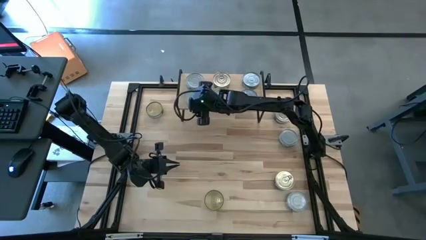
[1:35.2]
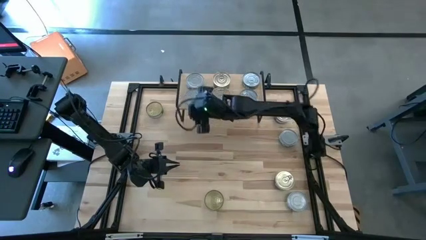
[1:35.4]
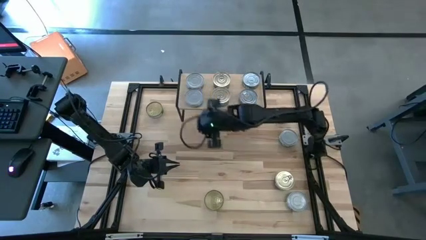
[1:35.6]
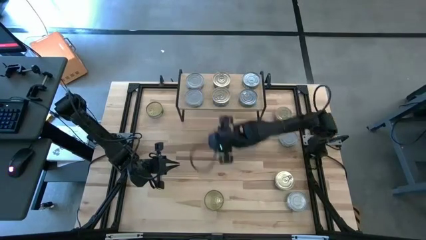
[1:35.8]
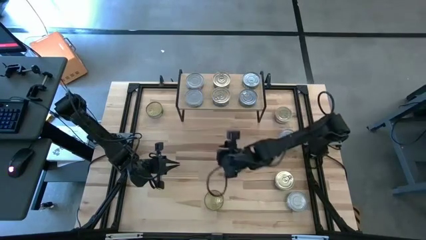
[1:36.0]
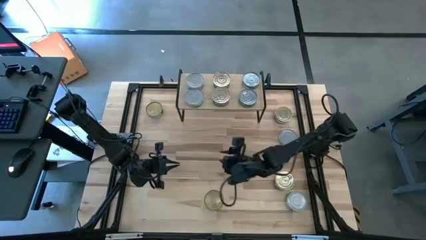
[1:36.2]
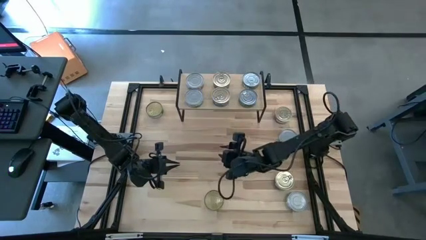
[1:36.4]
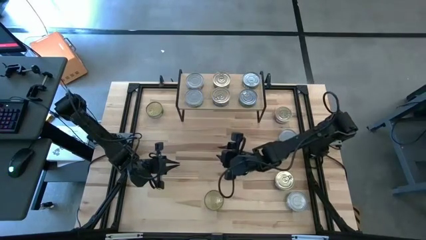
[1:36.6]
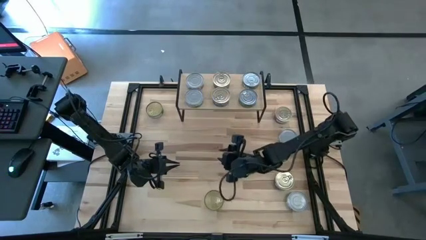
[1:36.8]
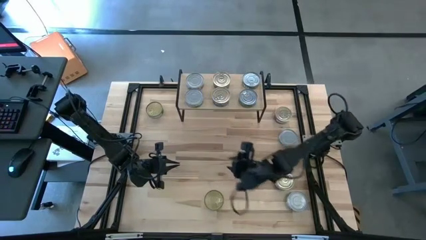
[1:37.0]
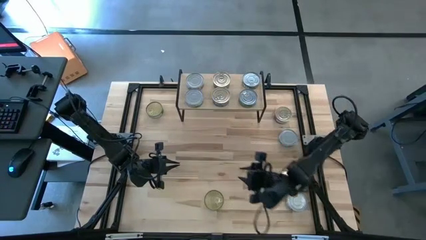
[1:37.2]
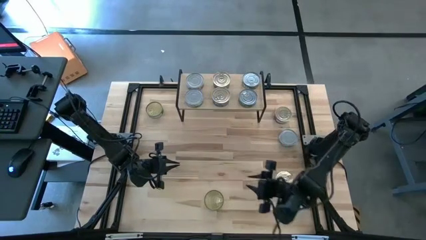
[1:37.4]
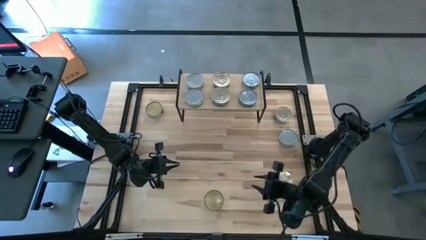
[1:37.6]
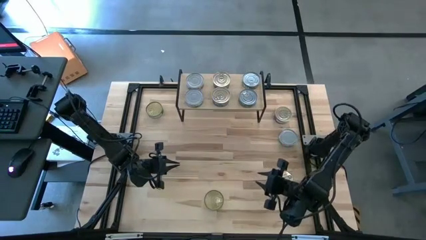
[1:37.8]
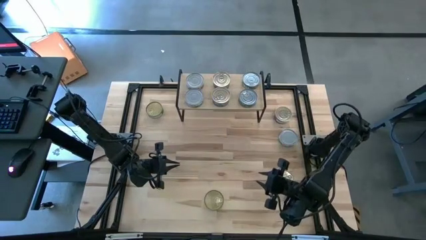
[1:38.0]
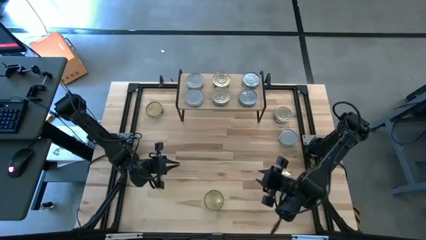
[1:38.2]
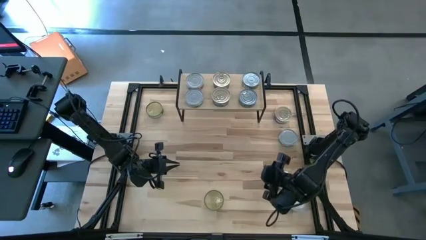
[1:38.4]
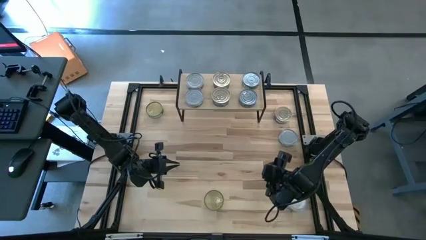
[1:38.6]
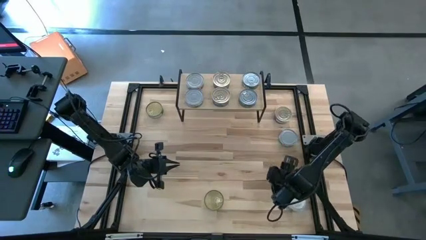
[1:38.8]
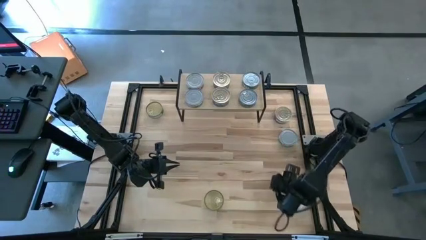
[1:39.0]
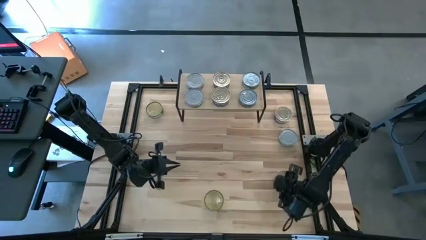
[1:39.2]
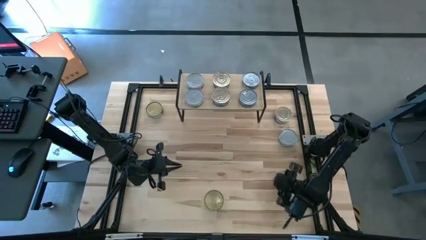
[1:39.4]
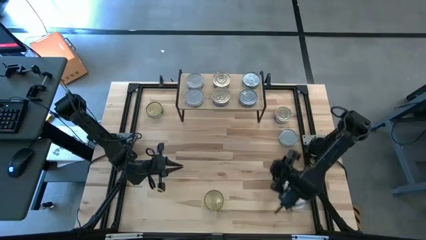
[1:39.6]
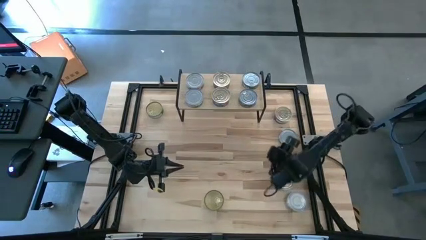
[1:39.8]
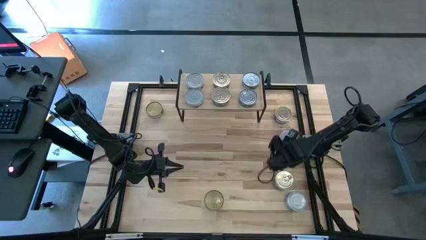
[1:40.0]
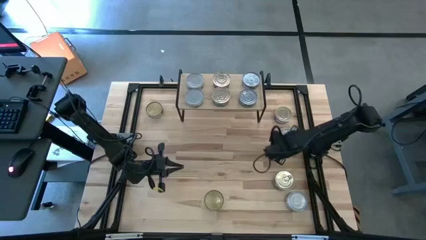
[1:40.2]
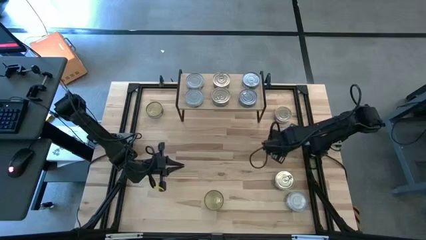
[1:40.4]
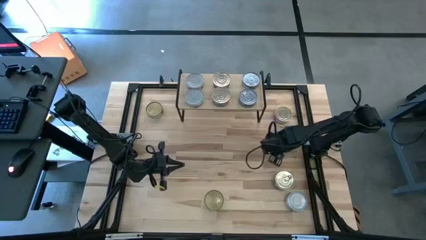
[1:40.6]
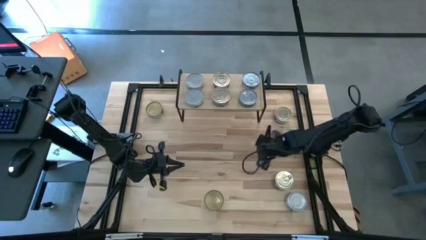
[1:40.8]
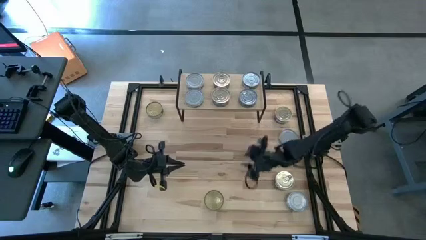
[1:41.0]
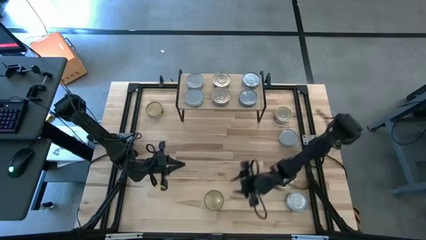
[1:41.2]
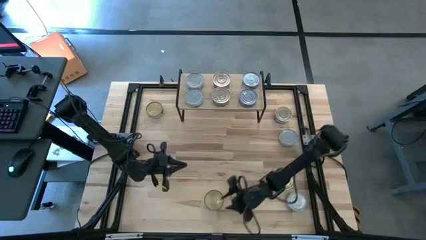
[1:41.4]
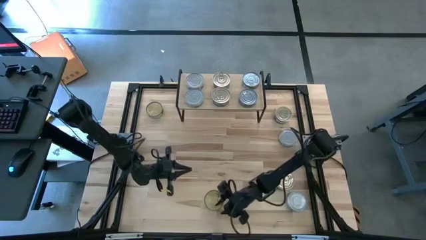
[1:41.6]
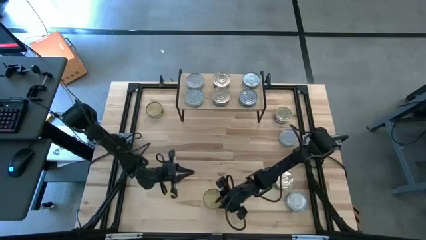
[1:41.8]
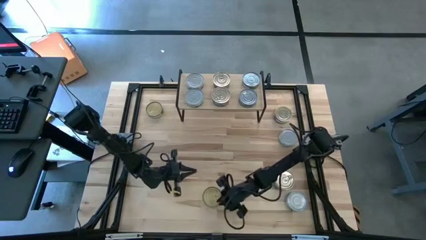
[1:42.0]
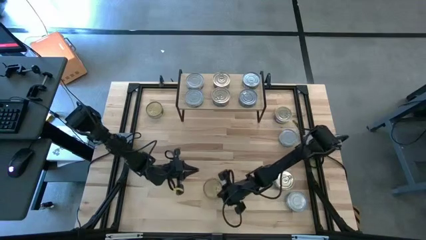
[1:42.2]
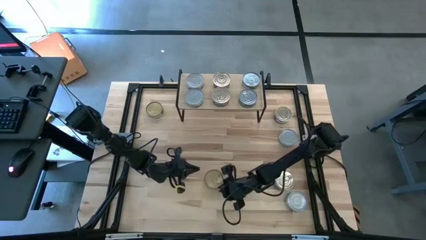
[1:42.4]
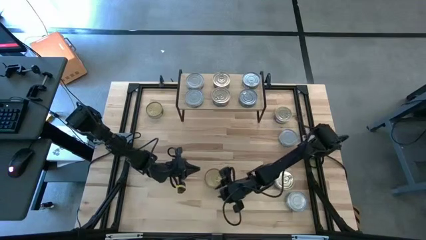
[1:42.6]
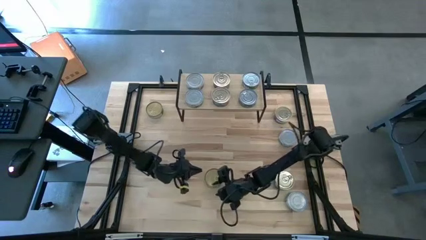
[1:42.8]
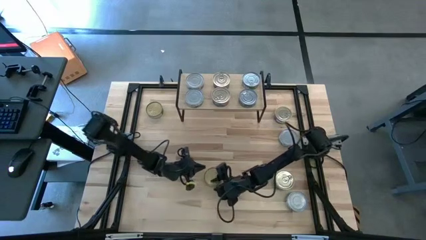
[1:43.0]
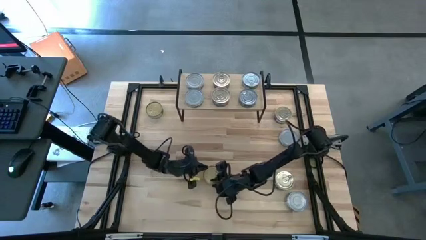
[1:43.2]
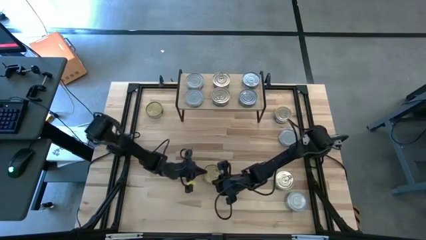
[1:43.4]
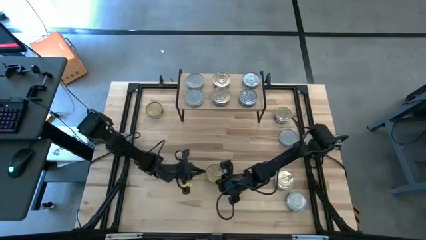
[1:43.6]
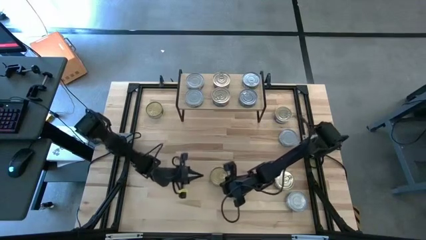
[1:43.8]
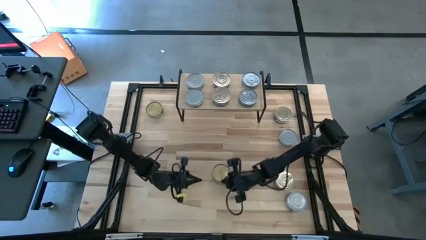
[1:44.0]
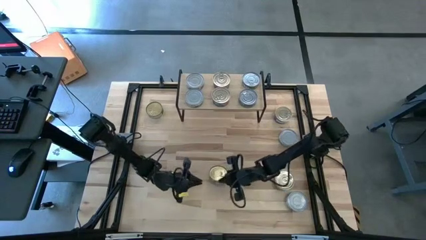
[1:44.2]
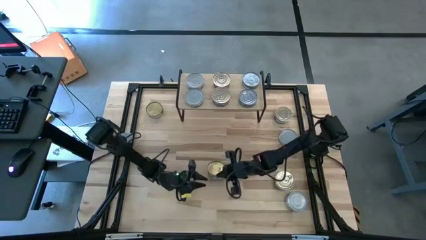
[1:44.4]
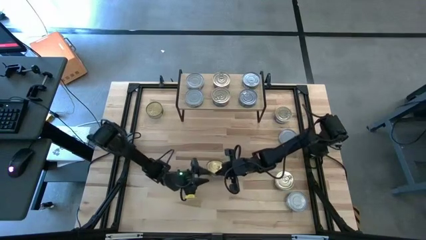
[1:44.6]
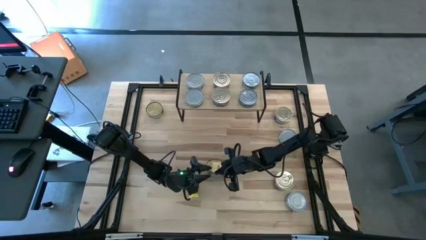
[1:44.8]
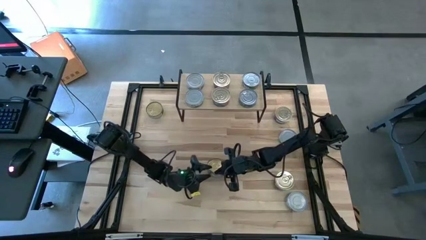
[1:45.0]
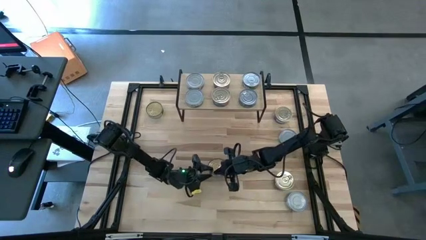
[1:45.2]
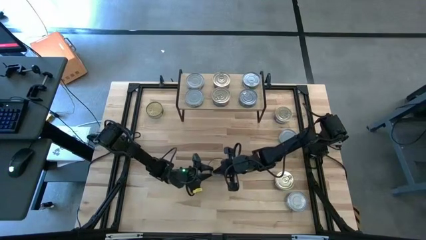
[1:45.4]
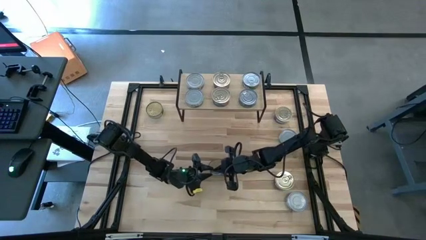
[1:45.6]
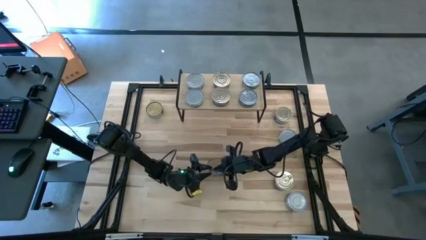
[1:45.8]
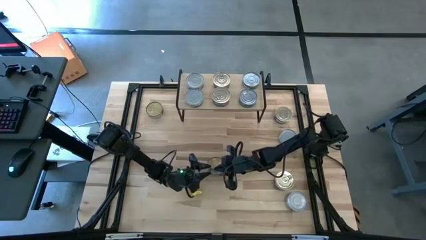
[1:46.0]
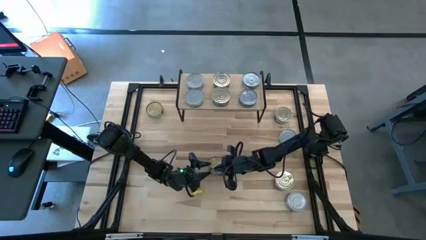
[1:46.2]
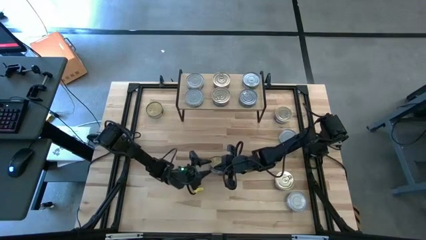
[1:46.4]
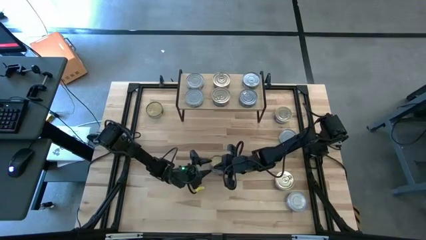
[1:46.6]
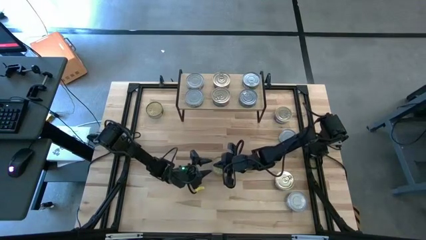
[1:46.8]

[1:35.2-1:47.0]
Task: Stack canned seafood by type on shelf
Stack the green tuna can on top of the other green tuna can on the shelf

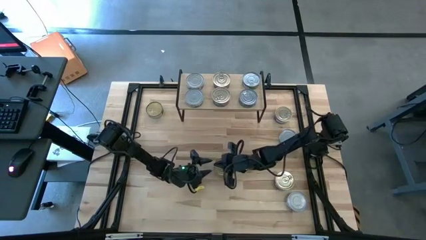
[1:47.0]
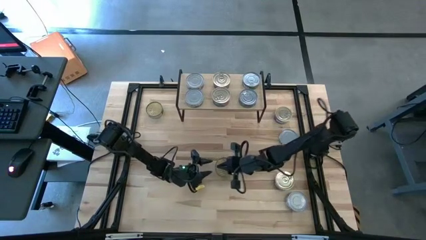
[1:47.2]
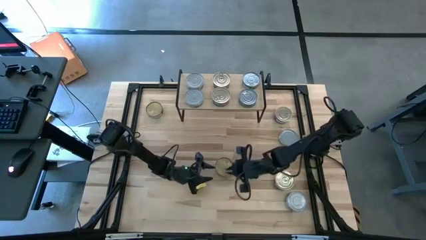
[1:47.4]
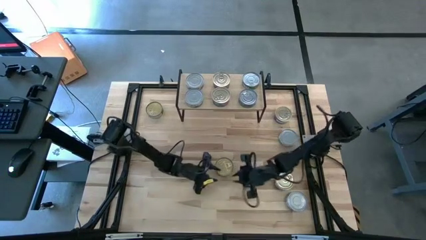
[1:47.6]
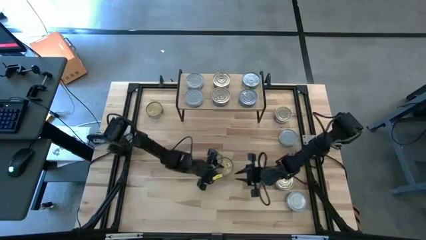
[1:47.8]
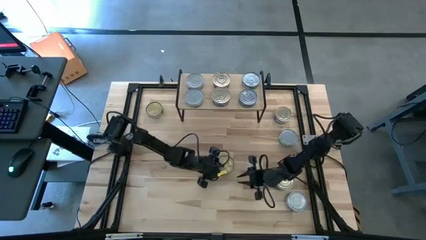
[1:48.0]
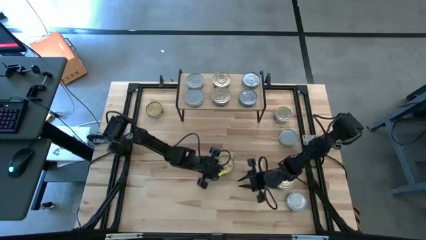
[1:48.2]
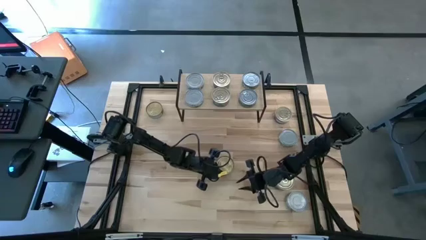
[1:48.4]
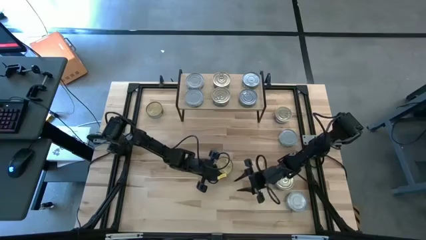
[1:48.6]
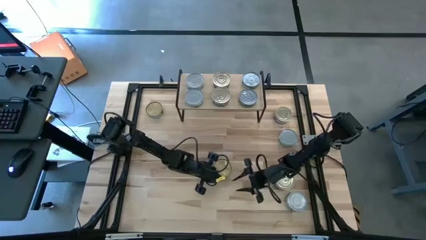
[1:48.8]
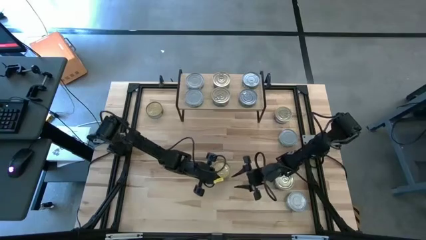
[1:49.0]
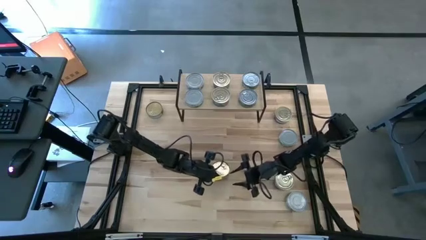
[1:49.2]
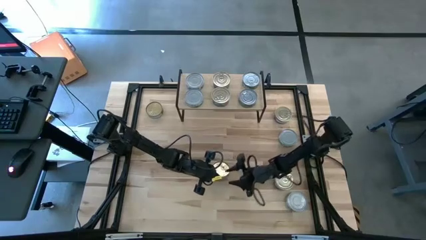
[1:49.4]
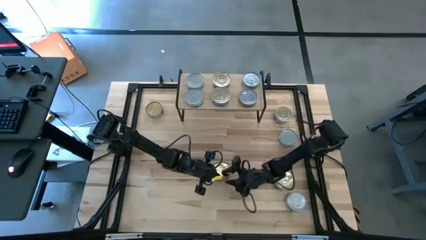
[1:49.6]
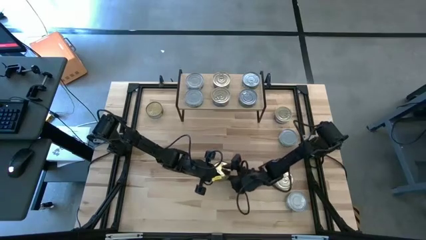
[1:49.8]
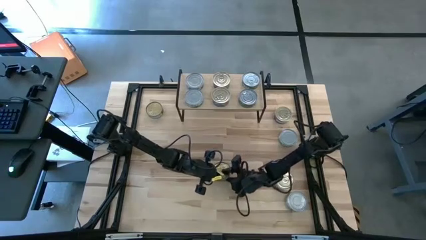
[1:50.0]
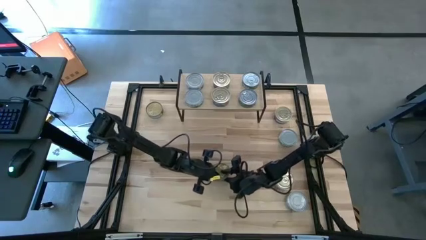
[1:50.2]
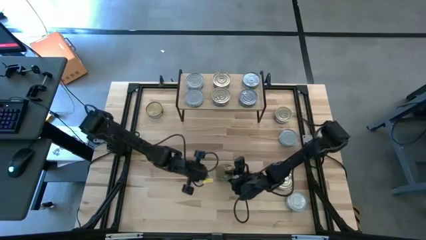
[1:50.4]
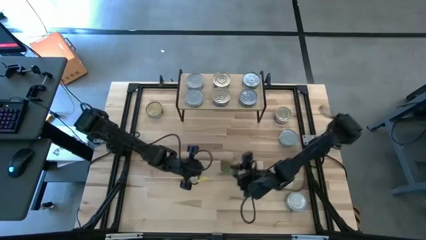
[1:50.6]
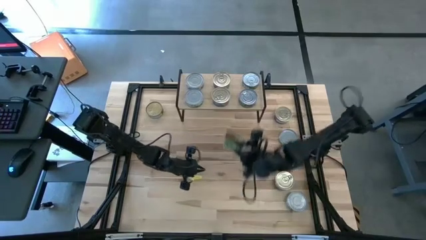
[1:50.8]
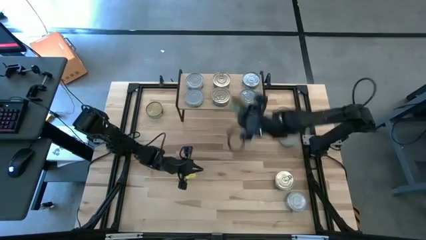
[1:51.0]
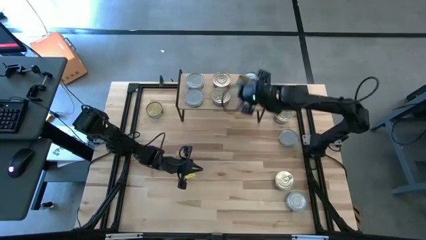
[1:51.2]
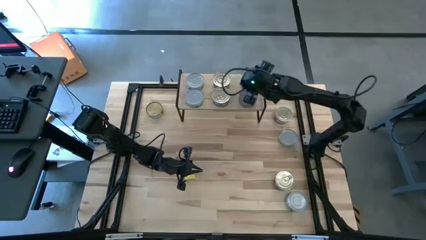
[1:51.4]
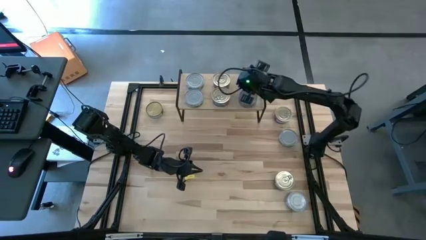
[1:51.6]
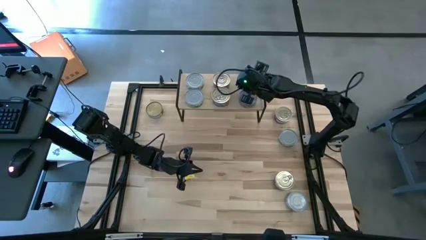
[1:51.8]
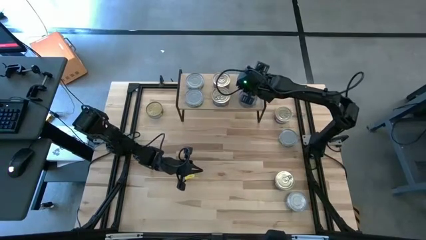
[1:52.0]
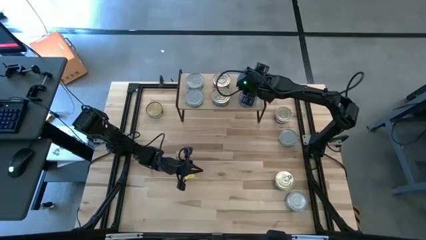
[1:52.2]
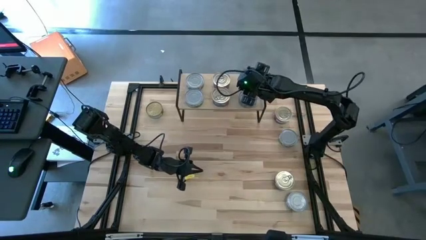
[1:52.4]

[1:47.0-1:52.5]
Stack the green tuna can on top of the other green tuna can on the shelf
